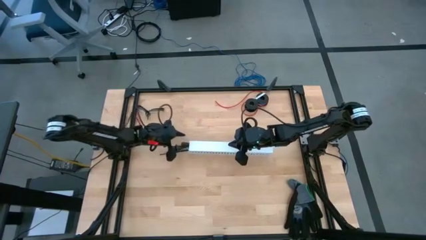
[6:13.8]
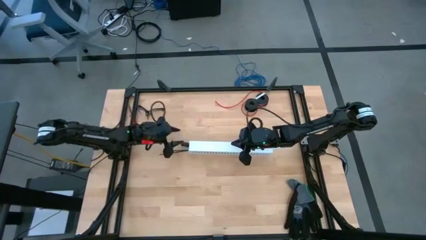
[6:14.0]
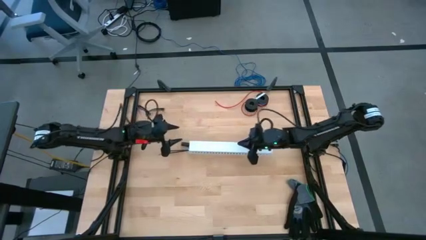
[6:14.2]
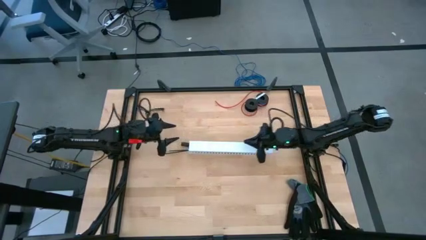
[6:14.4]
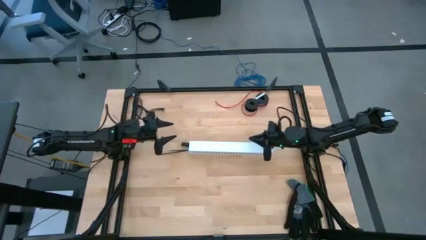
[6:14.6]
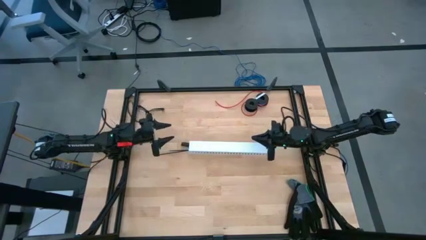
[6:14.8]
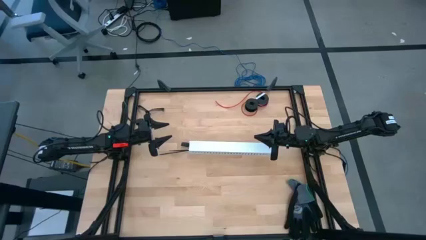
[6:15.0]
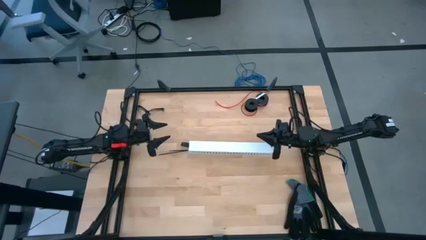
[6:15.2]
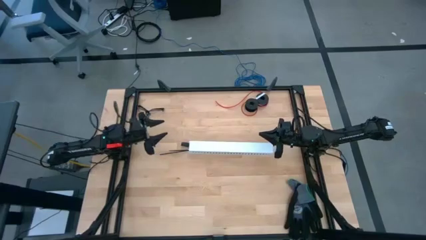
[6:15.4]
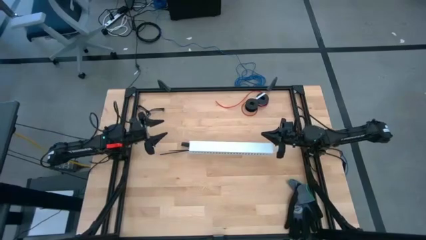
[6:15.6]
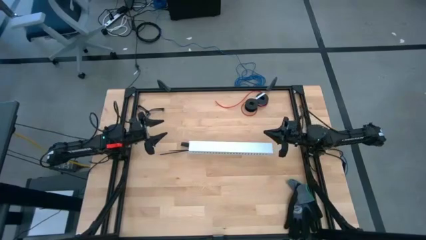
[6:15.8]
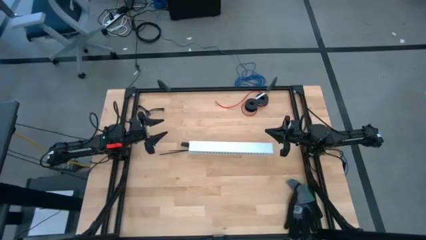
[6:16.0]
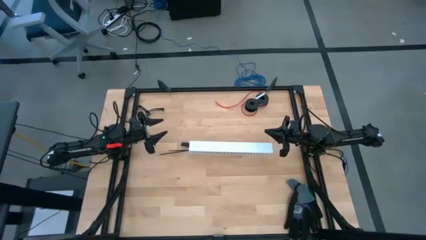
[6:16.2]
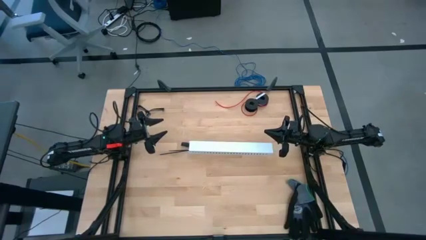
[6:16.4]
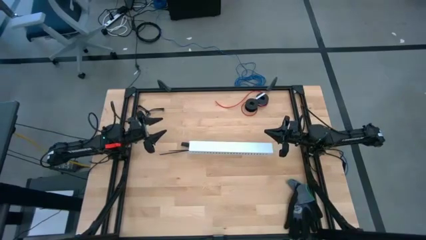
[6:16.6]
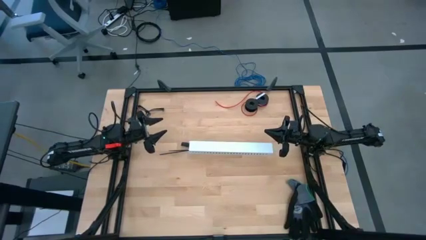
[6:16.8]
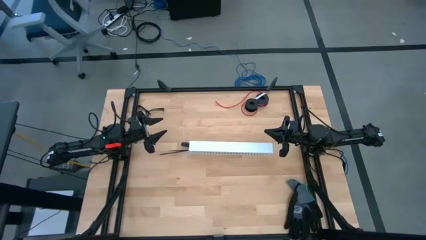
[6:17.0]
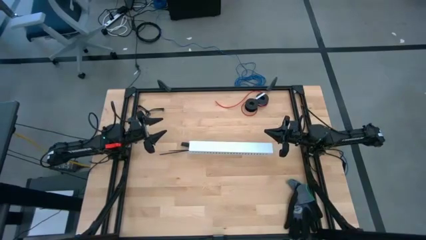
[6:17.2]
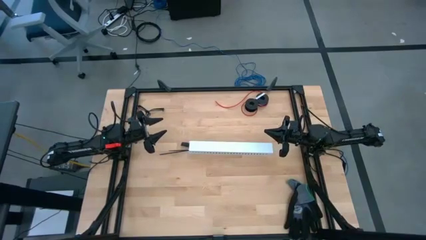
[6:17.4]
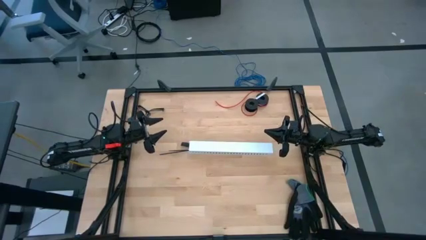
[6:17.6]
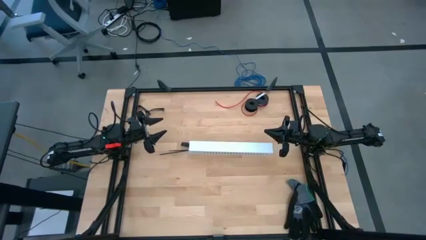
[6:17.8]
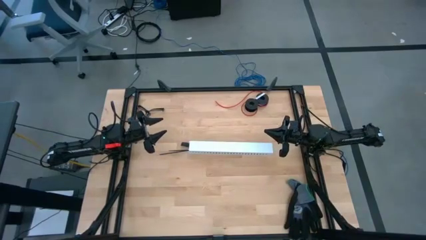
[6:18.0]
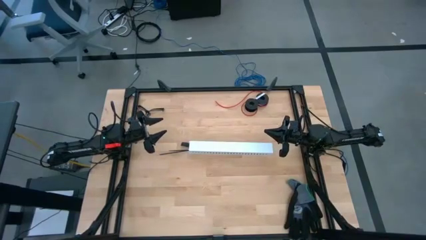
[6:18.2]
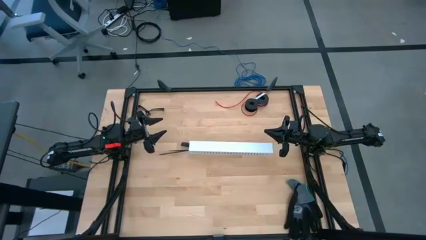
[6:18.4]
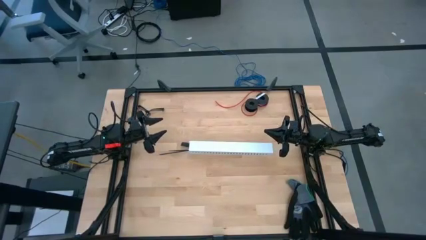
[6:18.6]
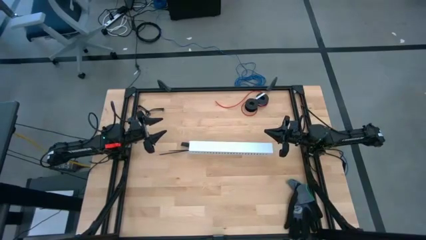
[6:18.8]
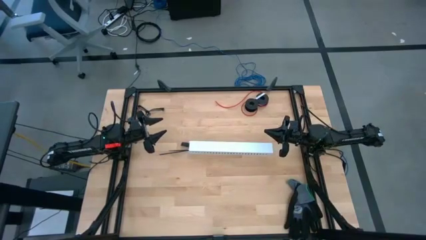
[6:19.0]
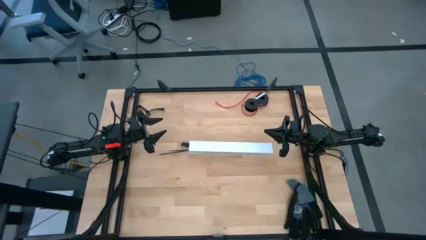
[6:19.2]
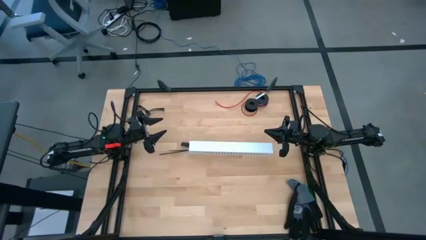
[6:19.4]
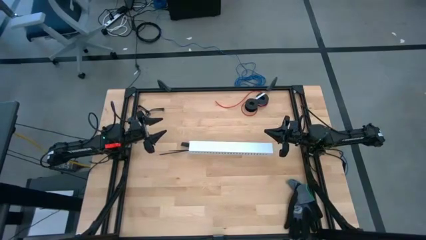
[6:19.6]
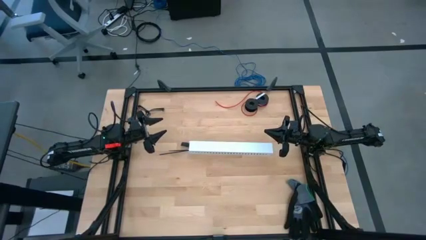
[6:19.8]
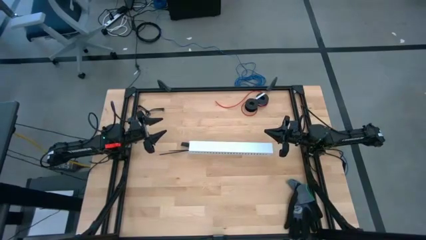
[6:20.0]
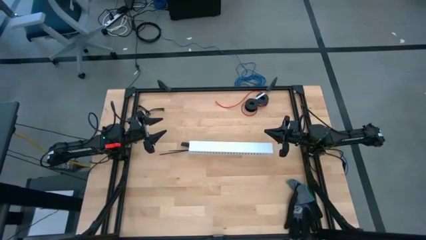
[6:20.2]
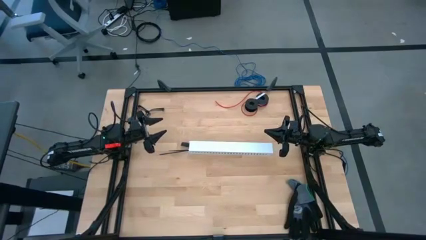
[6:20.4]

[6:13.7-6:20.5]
Task: Ziptie cables
Return to Home Position

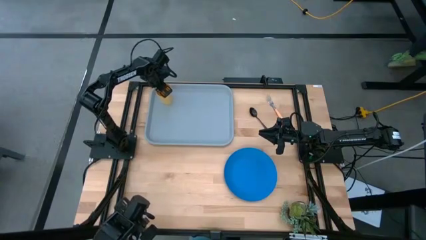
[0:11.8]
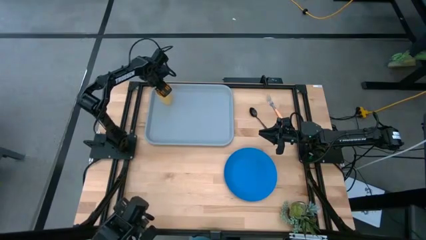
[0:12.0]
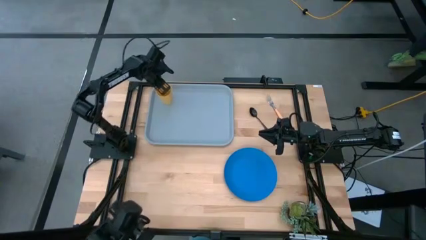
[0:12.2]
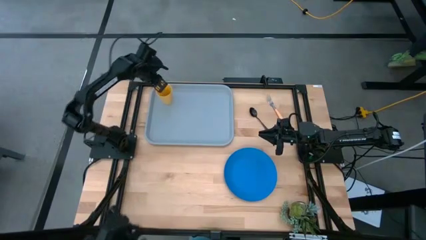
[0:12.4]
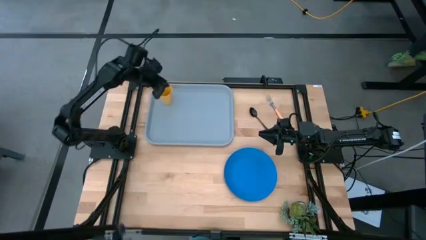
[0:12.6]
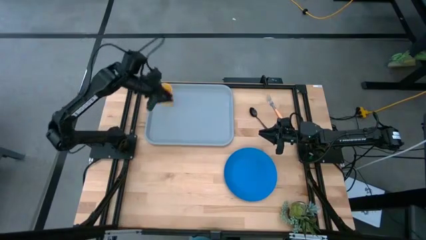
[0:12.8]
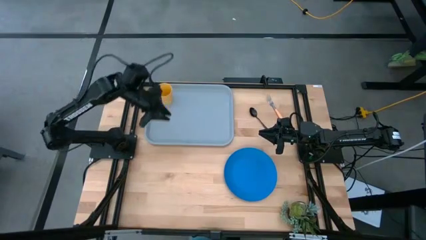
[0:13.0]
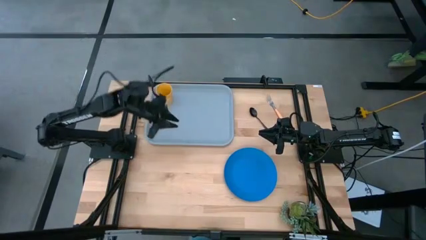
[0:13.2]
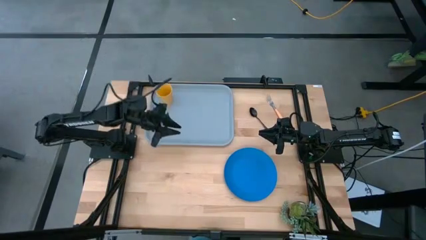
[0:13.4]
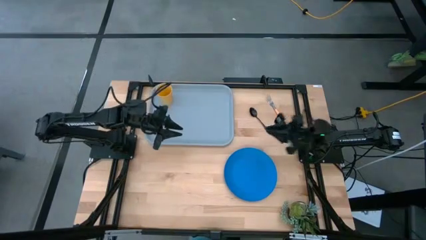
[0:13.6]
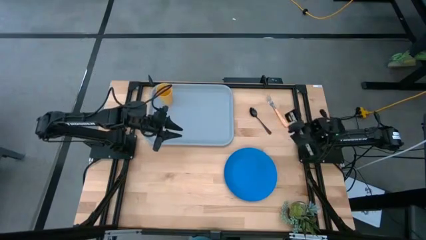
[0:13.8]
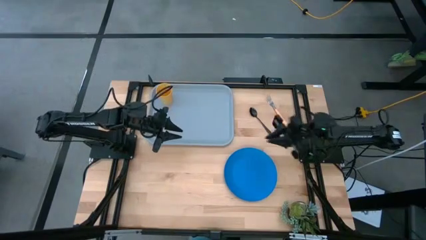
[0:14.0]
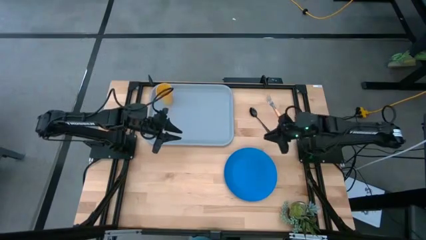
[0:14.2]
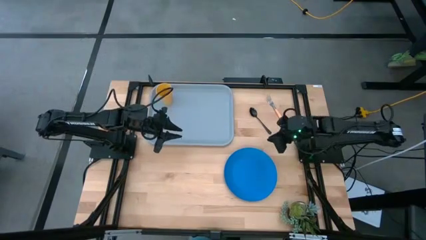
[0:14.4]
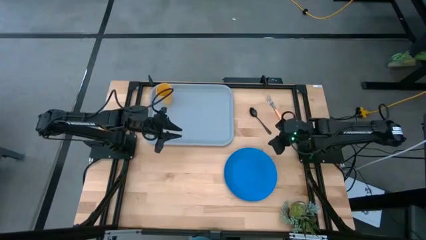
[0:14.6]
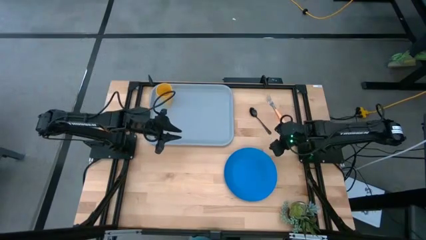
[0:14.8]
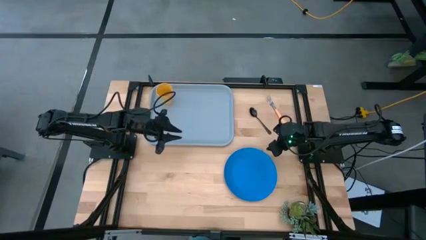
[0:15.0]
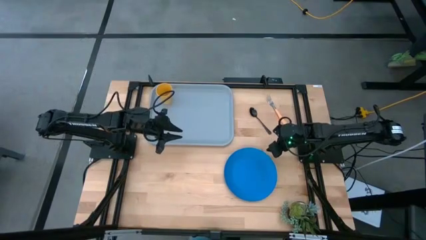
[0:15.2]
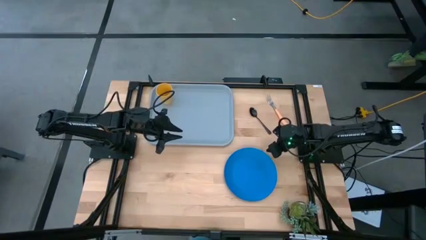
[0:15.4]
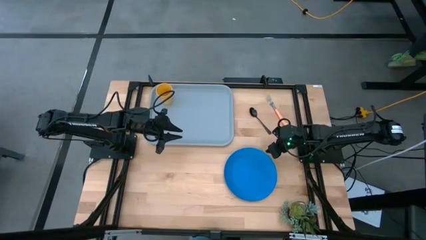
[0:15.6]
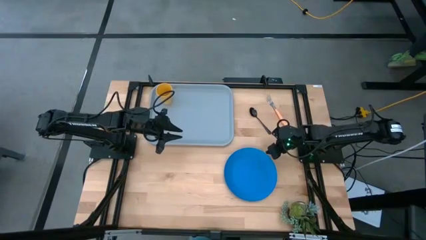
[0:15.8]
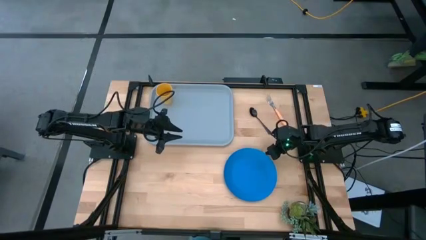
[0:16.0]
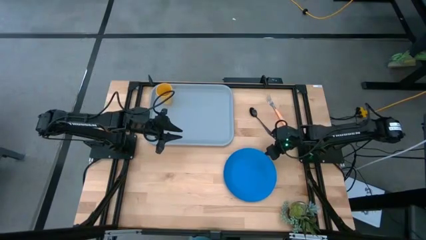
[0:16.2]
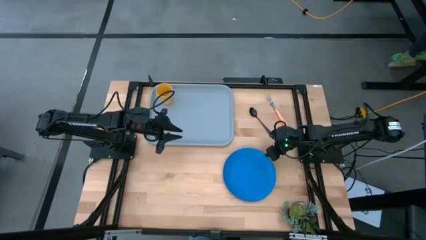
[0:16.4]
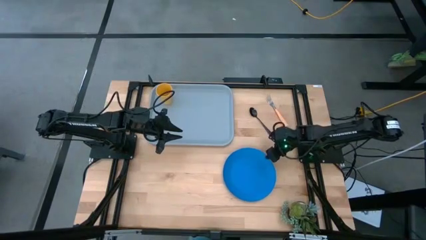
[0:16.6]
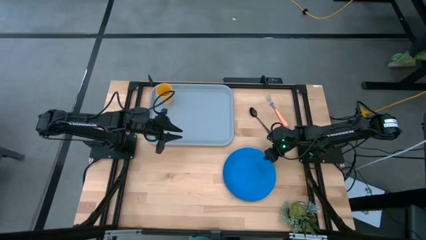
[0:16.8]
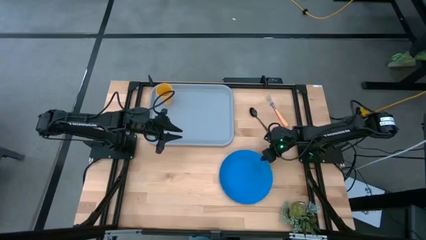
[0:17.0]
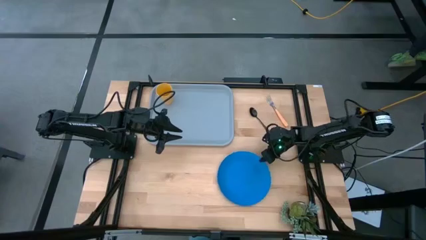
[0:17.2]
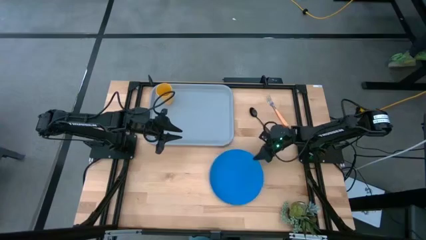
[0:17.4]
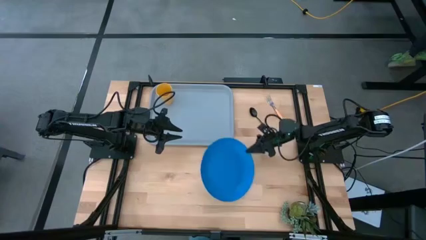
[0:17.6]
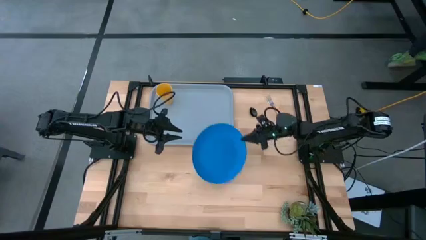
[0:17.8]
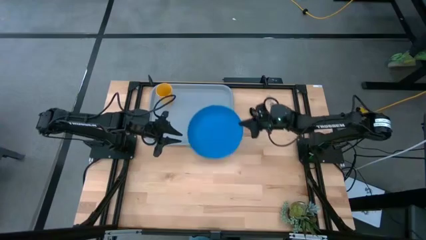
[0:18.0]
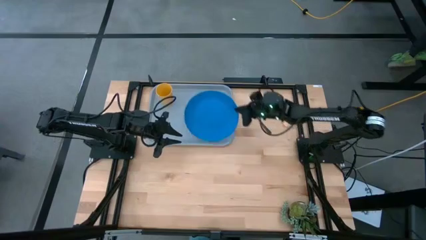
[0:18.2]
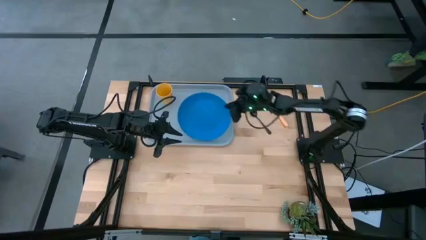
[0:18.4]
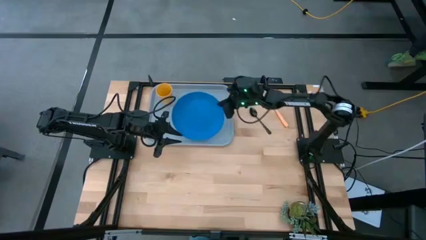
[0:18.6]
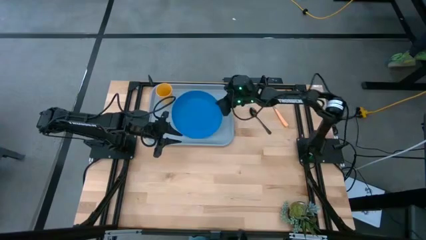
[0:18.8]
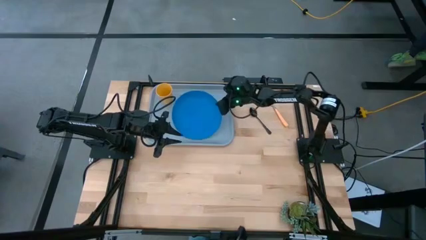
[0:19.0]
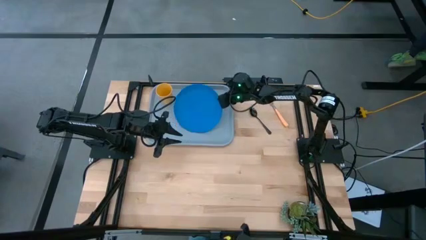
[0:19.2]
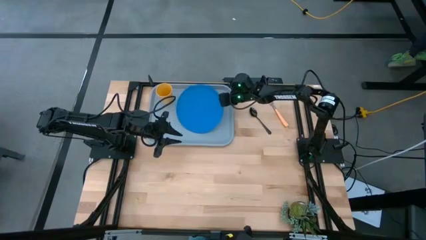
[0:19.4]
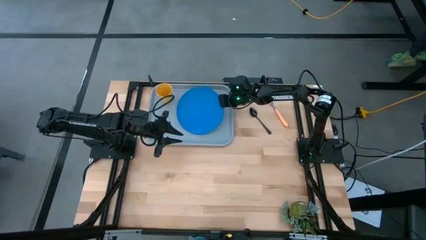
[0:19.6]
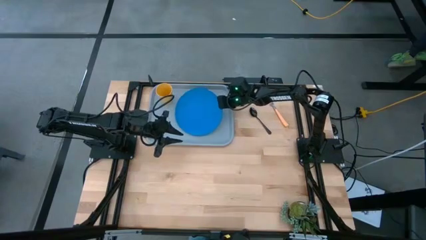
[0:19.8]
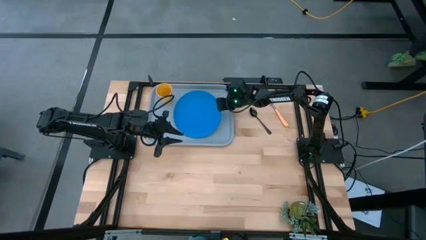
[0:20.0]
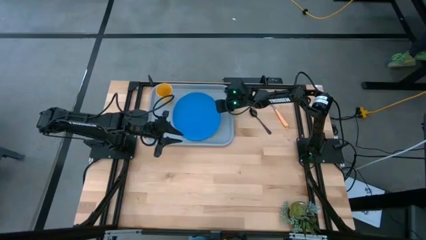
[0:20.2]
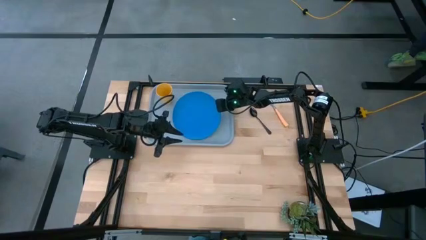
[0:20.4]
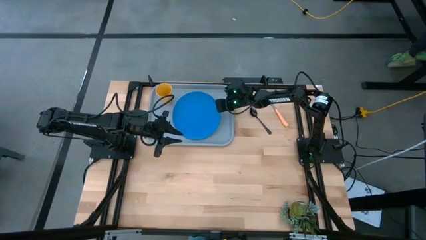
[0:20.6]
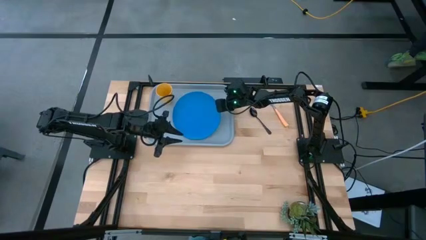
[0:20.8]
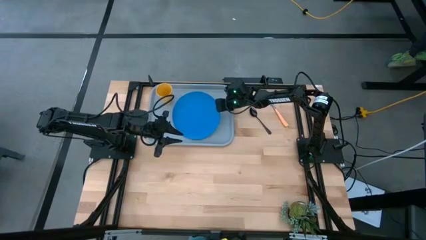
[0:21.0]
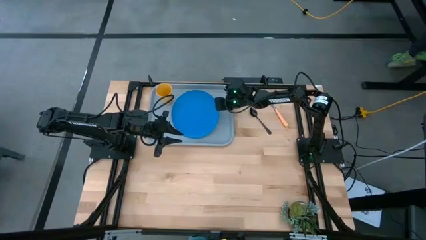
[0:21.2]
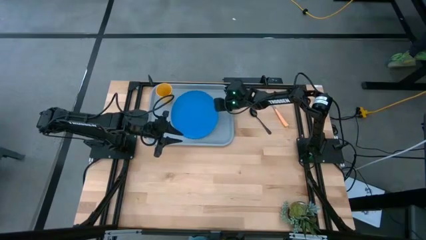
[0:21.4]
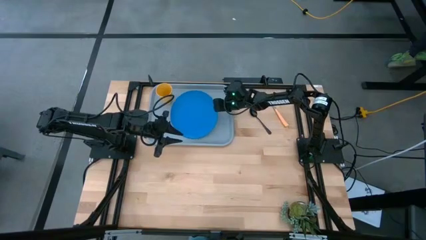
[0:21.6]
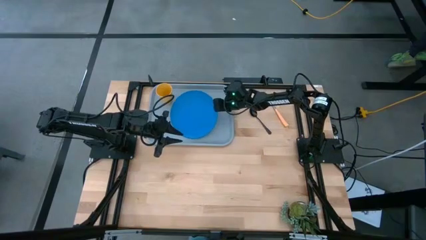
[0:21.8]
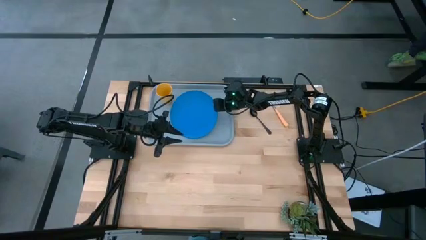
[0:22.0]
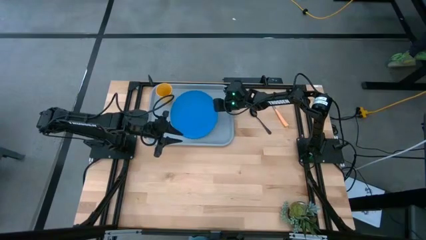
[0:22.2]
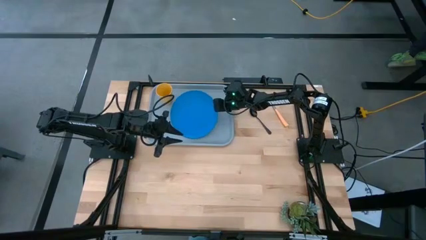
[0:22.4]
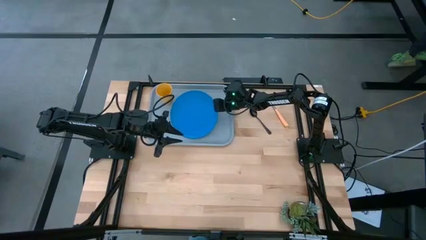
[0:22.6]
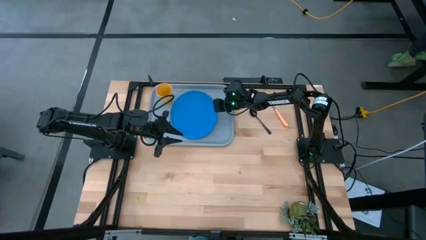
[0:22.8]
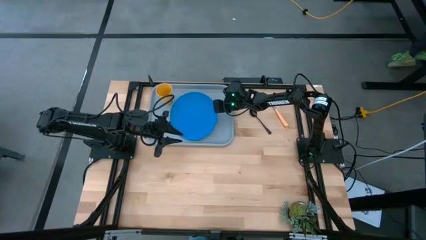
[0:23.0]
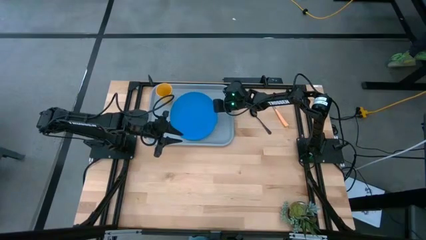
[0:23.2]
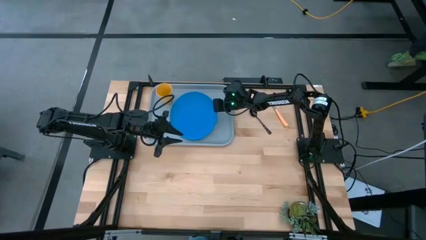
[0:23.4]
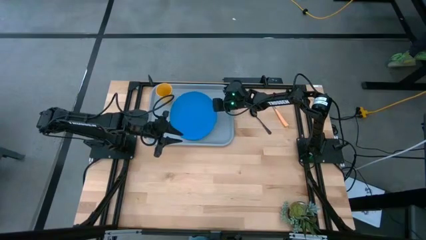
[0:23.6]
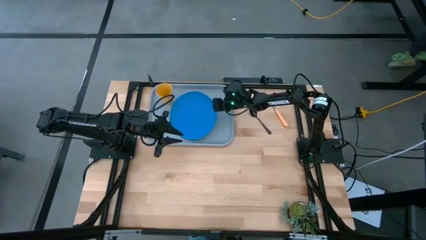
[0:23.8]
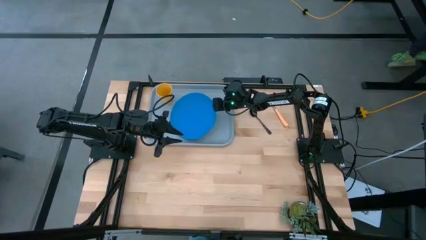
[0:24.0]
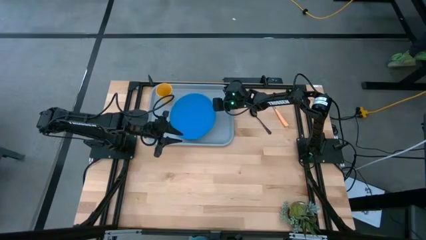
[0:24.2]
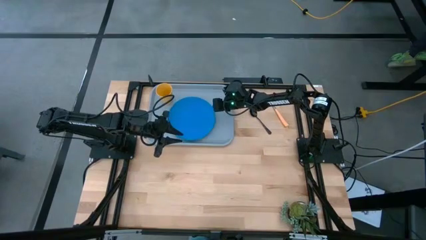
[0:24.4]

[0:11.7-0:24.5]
Task: Pick and place plate/cup/fork/spoon on tray
Put the blue plate on the gray tray
